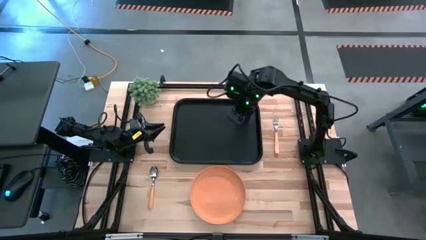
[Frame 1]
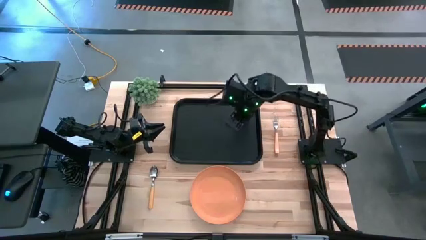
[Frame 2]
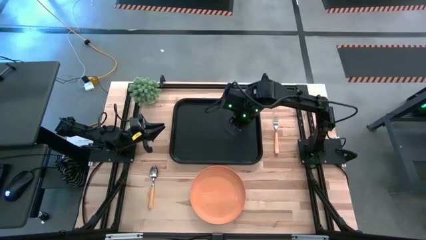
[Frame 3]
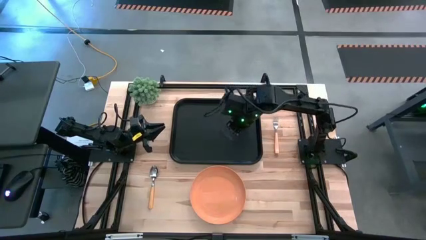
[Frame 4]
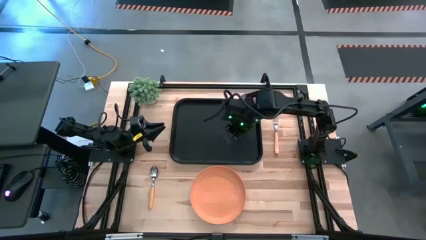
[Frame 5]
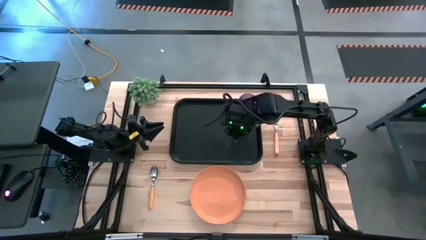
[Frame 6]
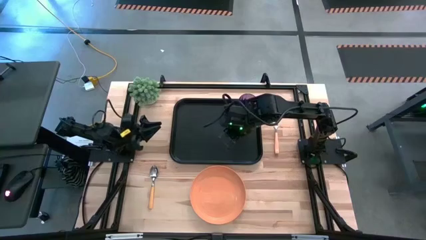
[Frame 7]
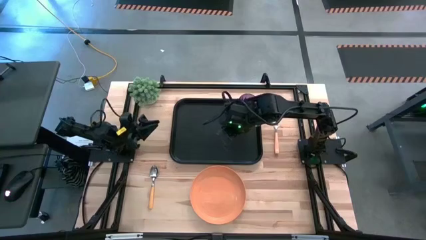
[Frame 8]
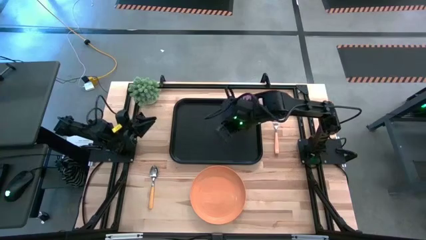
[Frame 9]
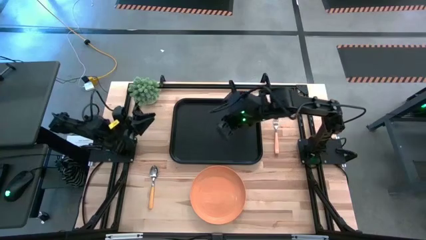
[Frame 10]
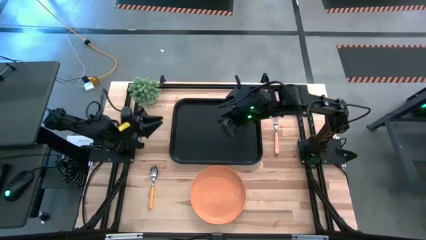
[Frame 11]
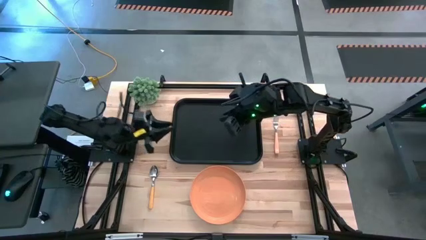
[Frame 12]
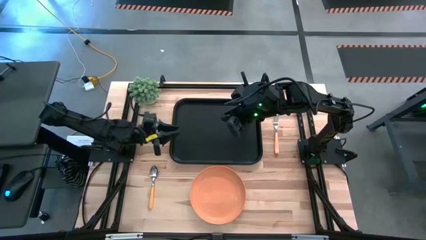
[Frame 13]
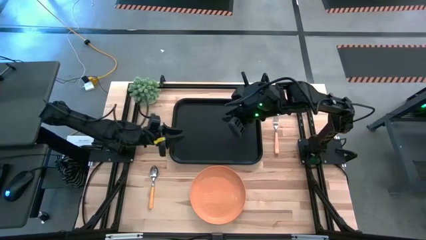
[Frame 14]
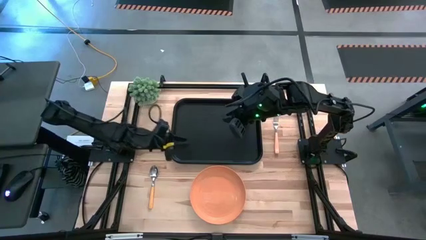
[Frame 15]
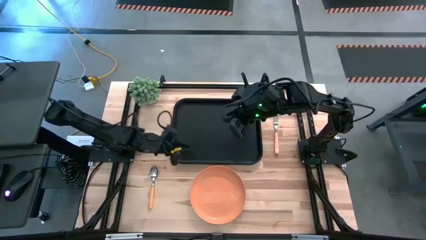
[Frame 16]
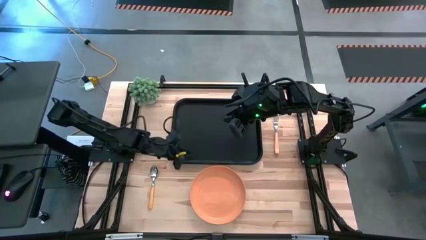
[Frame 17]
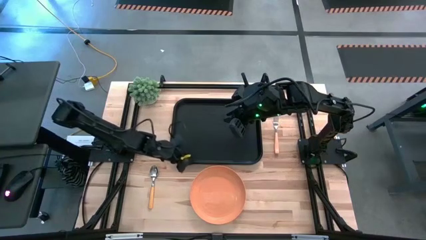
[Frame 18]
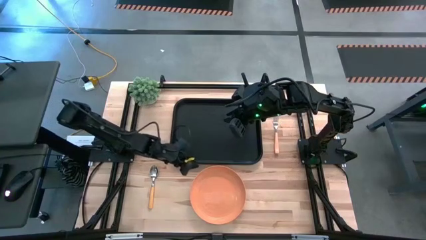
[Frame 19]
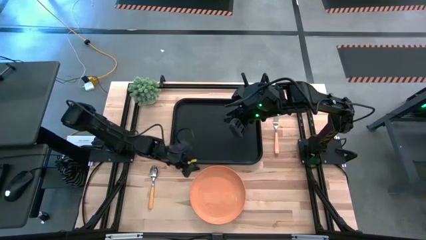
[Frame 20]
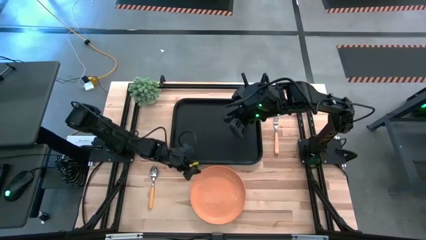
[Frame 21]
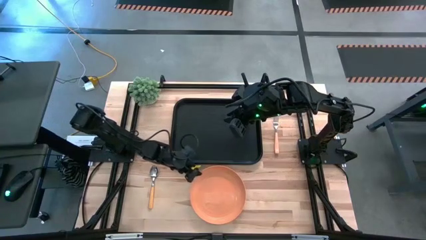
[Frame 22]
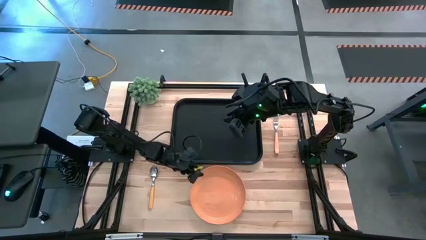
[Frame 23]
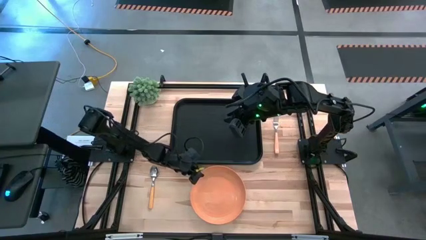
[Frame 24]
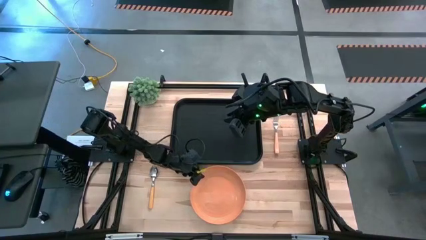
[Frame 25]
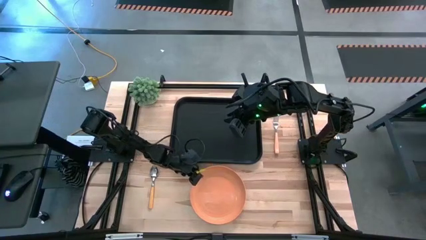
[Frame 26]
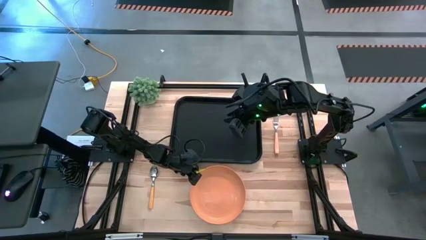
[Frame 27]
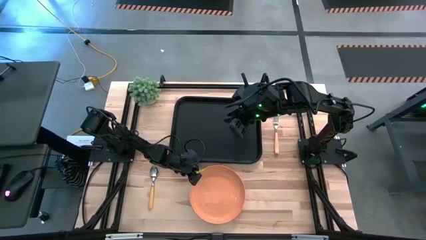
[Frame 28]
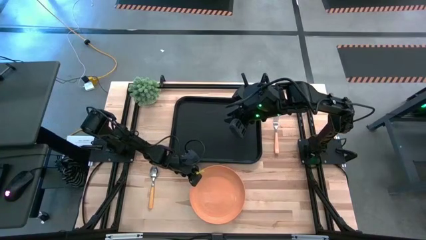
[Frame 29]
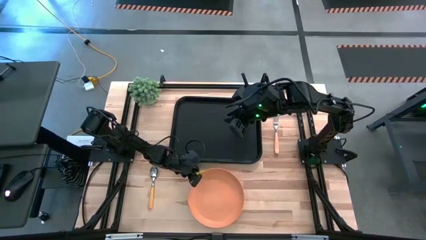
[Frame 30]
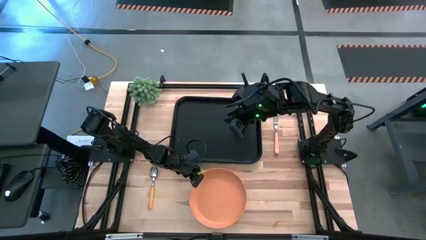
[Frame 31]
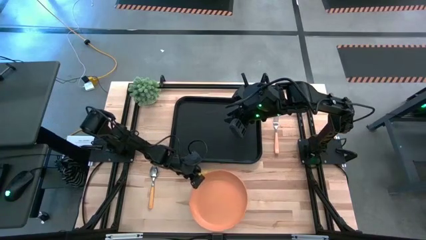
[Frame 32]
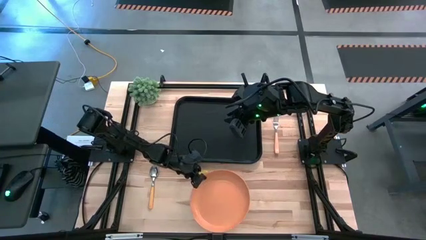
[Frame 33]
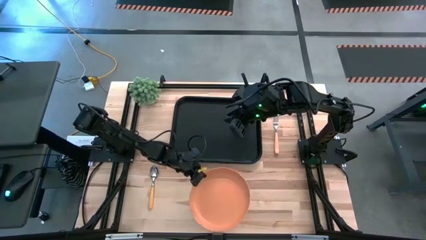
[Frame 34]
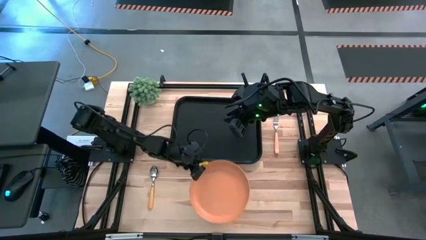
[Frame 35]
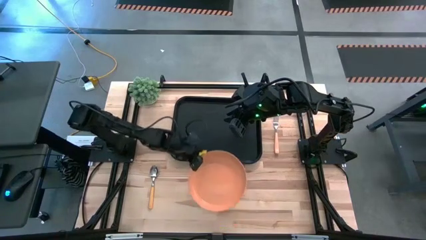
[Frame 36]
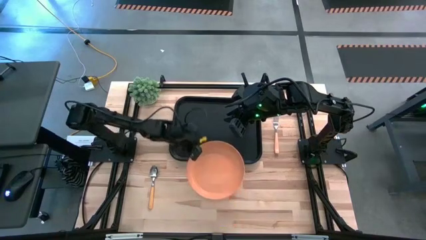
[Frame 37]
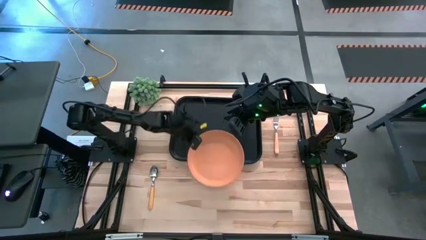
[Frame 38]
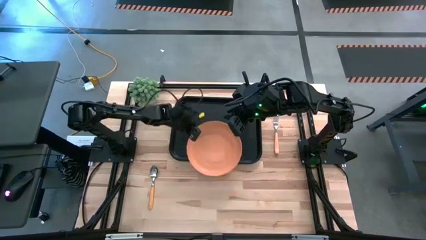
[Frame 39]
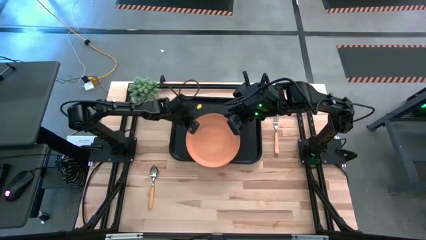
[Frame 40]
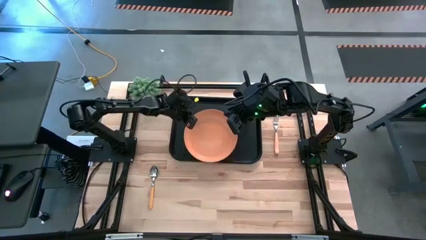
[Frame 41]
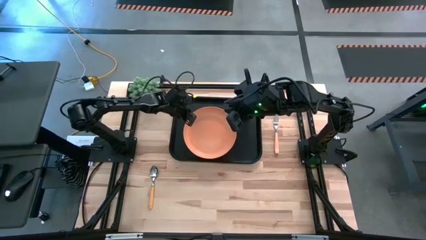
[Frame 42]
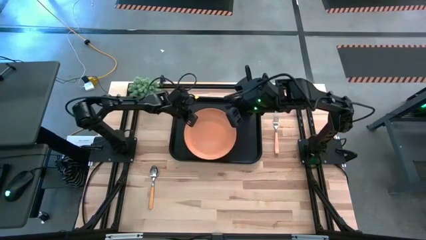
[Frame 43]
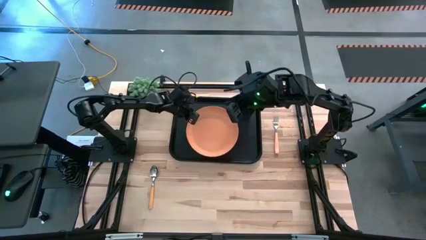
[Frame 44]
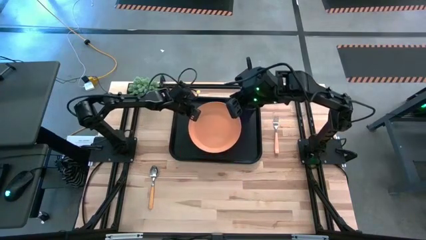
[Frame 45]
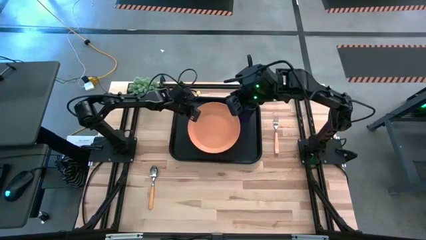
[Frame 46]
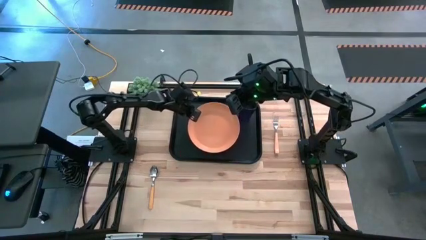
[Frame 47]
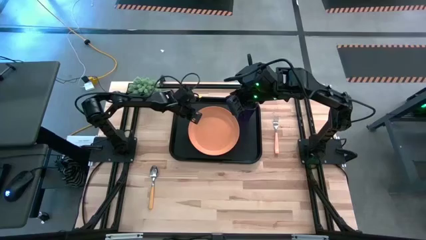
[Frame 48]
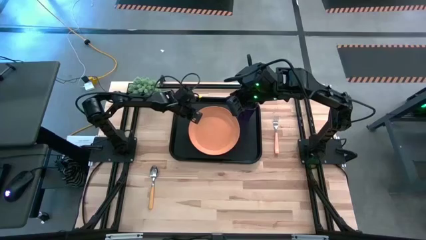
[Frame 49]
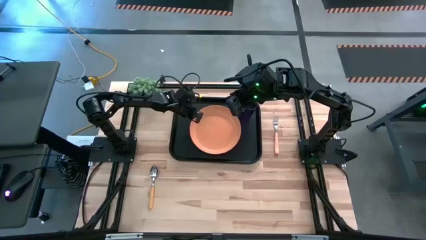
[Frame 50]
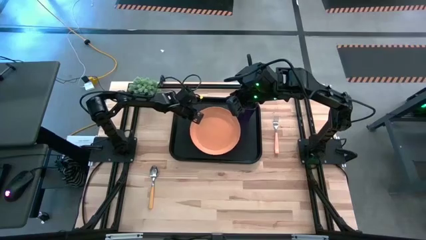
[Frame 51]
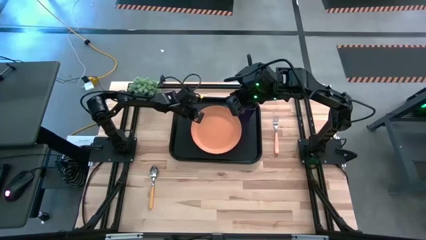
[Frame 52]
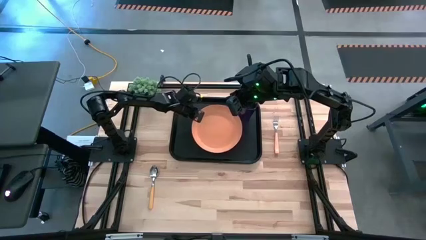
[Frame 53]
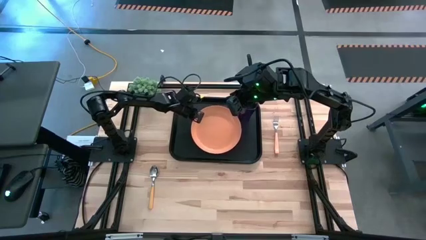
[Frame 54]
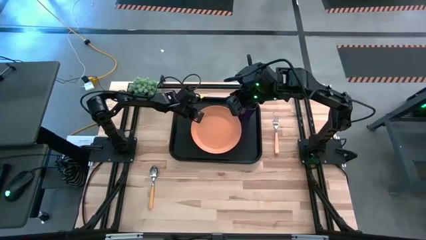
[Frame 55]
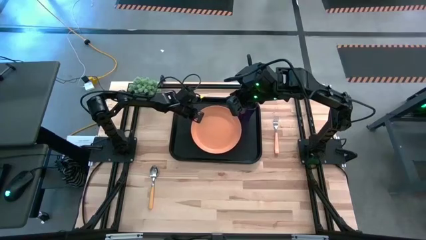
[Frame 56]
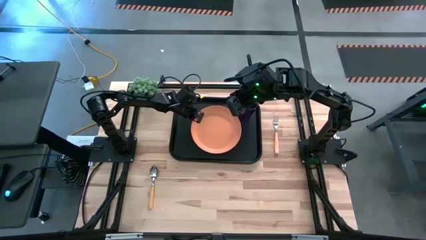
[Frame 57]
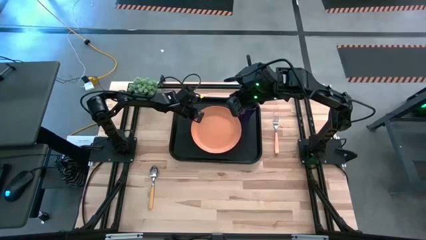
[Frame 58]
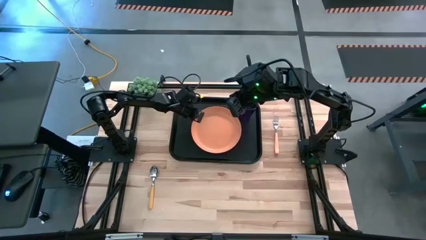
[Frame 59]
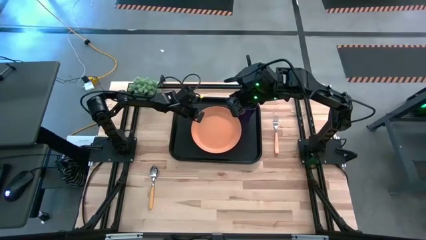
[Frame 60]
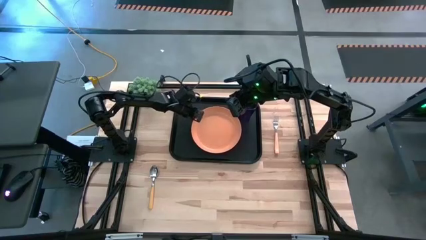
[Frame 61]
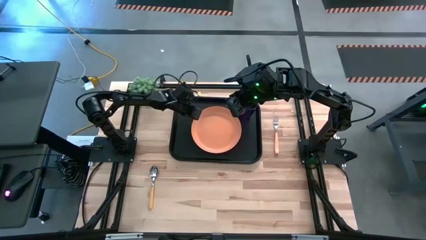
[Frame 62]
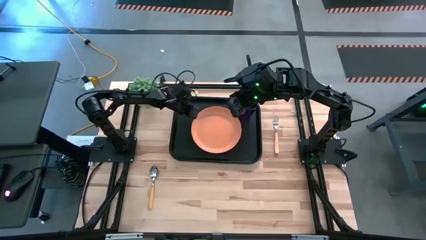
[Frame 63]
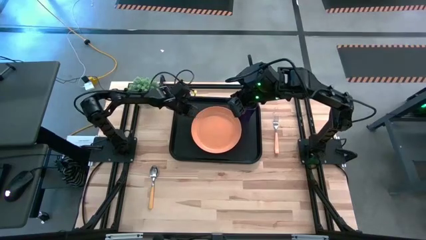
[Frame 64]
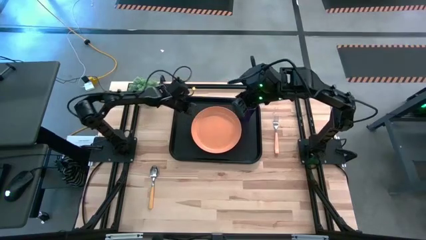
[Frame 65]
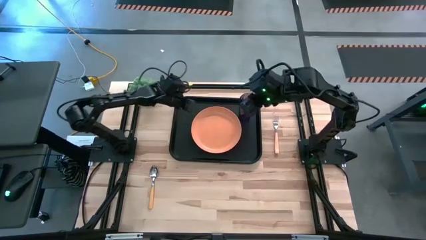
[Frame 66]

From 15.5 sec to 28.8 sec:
Task: Pick and place plate/cup/fork/spoon on tray
Put the orange plate on the center of the black tray
